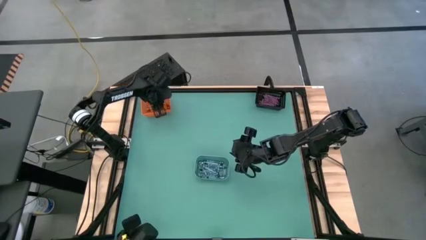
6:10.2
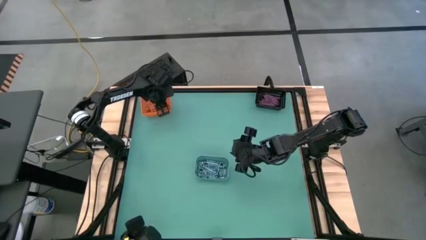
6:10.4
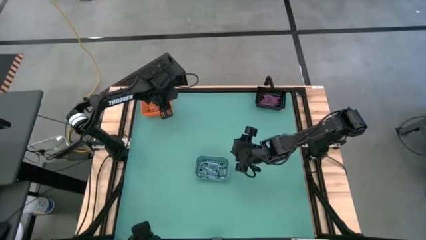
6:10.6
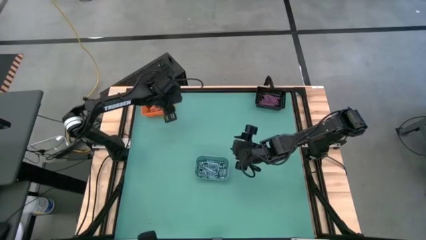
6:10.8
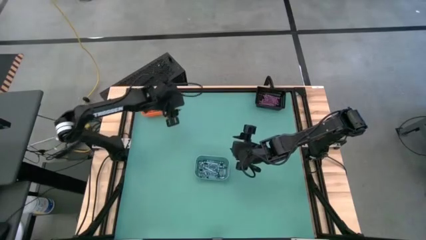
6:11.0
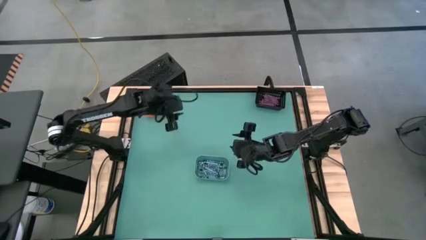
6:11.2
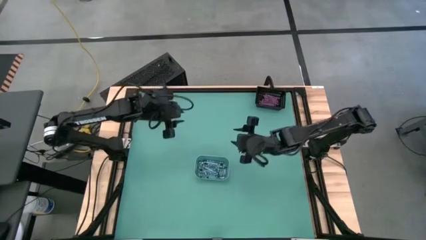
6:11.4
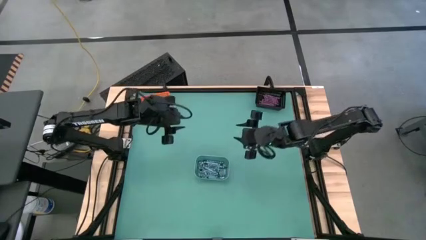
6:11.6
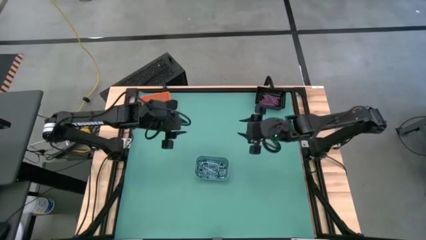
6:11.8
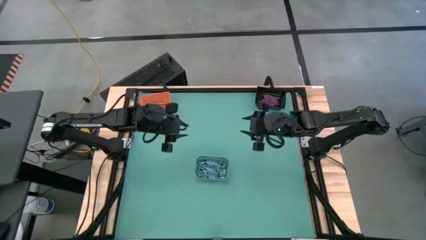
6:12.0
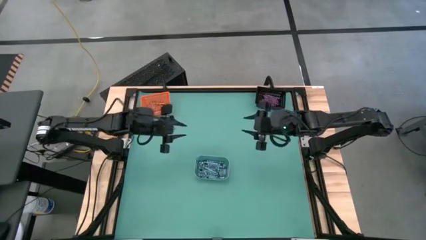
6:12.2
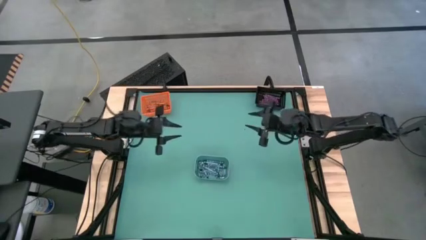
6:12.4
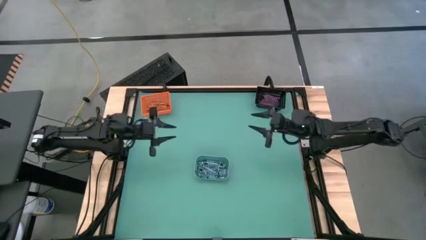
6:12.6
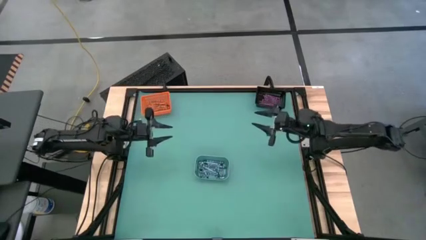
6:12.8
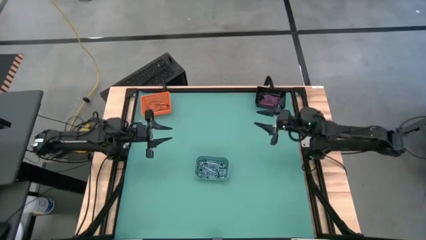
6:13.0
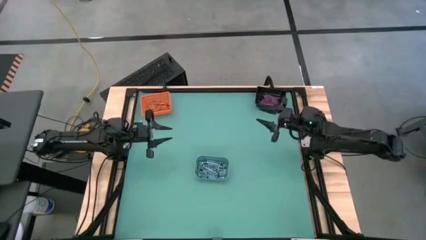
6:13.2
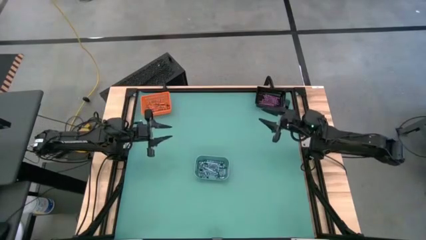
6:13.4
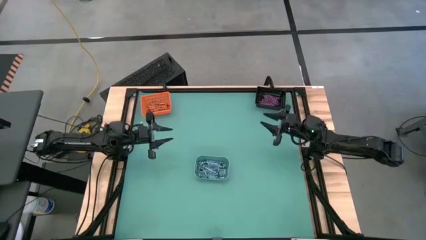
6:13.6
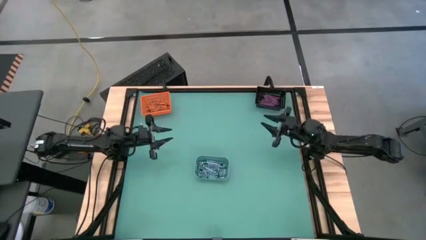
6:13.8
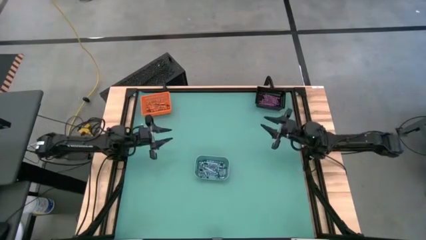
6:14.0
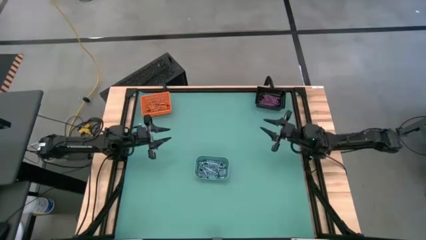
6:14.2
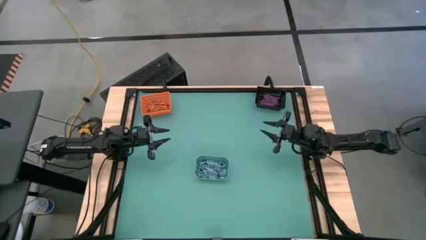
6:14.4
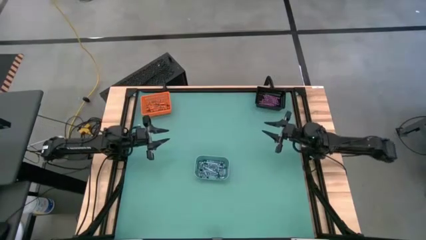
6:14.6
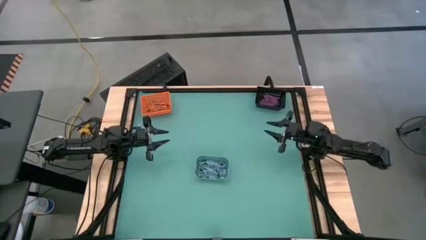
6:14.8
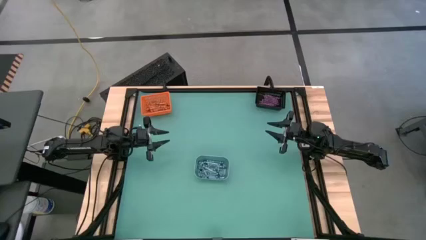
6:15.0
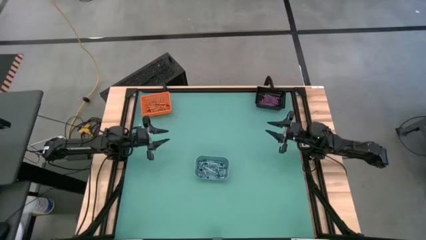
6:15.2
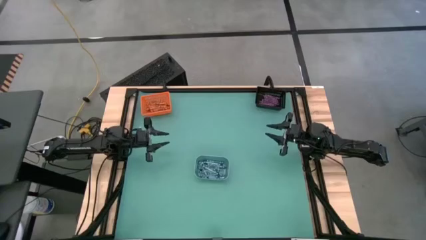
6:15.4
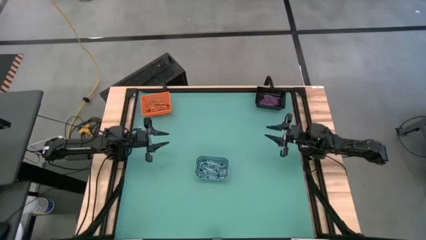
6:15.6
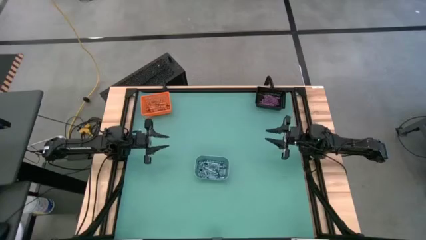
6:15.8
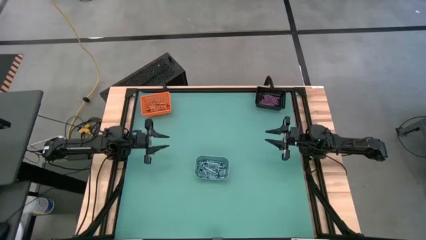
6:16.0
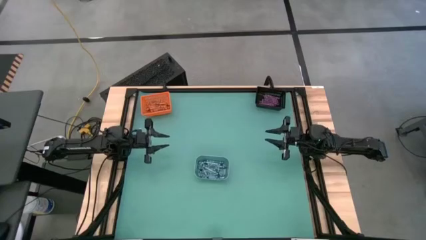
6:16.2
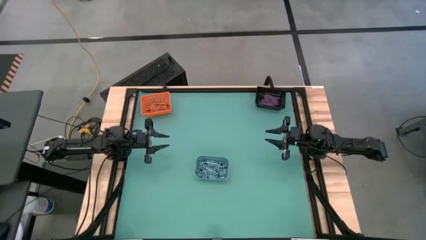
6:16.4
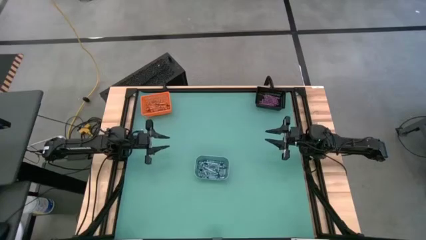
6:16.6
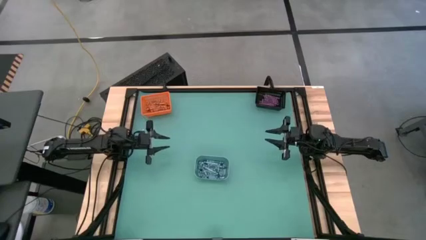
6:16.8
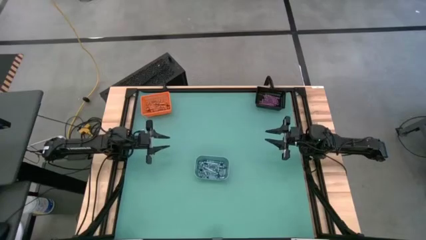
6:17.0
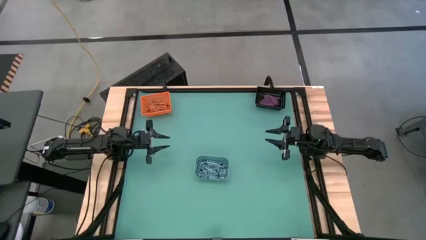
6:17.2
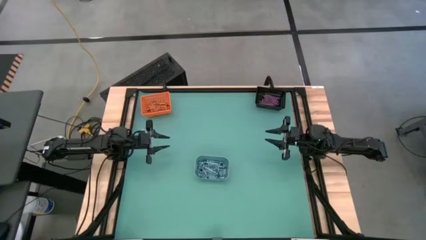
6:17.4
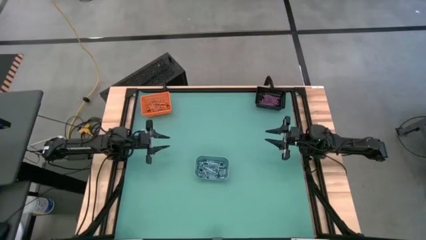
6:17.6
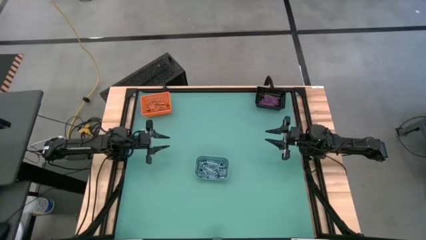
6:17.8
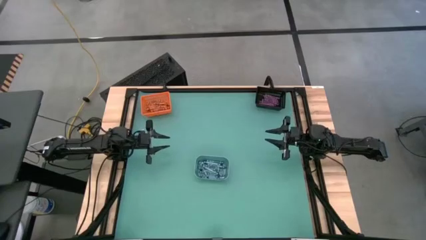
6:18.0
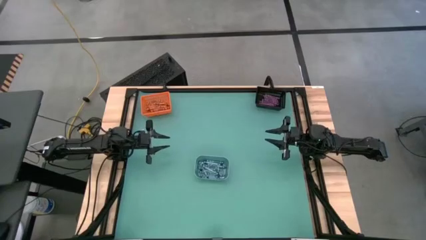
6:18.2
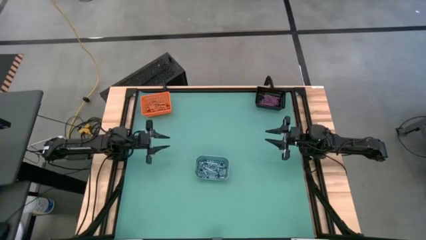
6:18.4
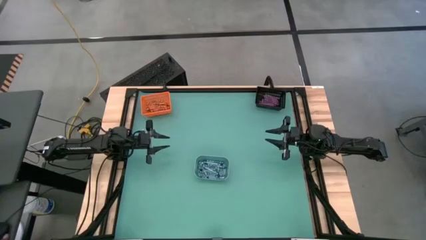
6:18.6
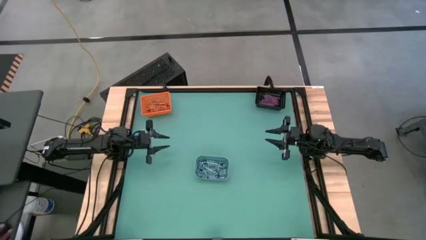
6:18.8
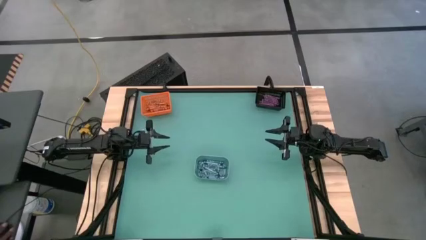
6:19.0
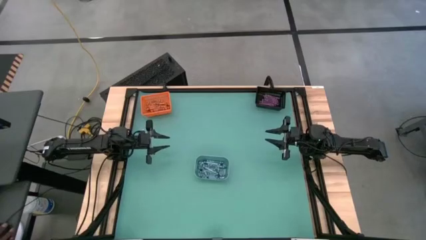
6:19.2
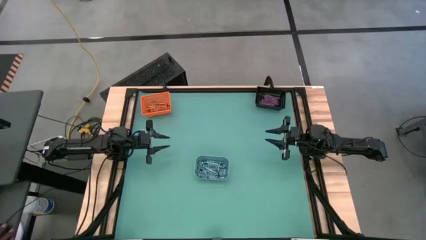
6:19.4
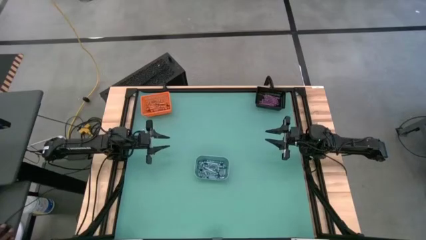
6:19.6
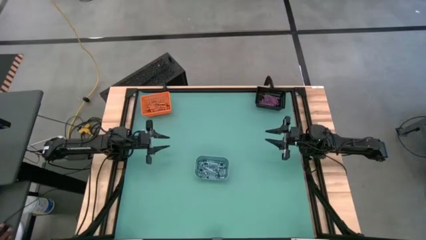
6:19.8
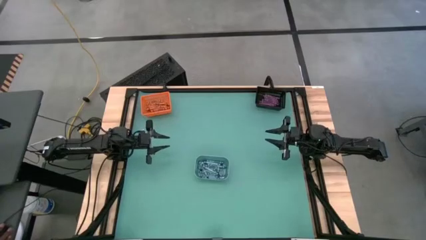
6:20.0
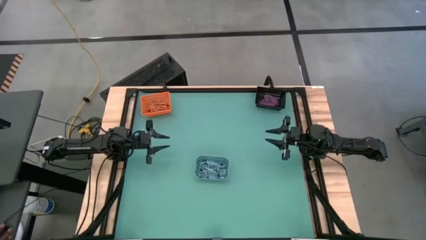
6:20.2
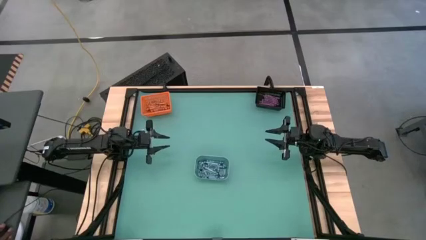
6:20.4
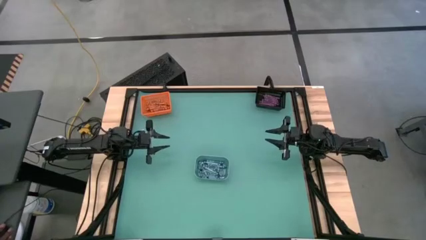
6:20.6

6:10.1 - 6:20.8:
Task: Sort crayons
Return to Home Position

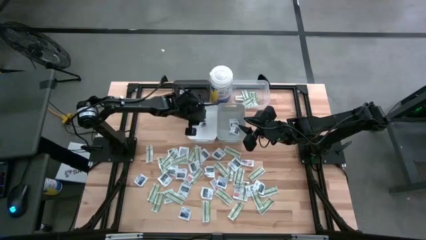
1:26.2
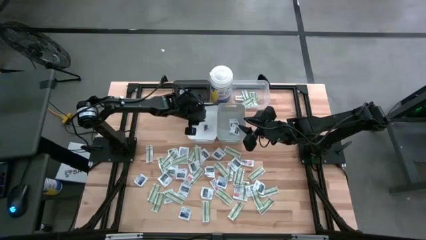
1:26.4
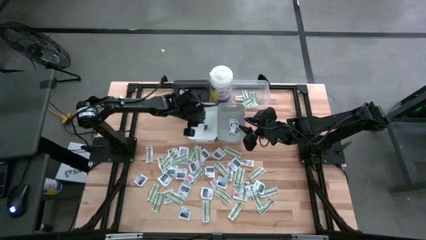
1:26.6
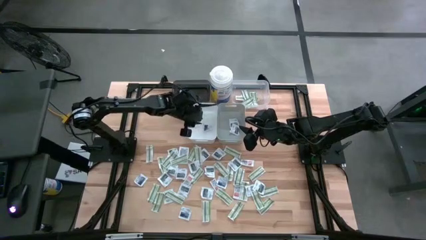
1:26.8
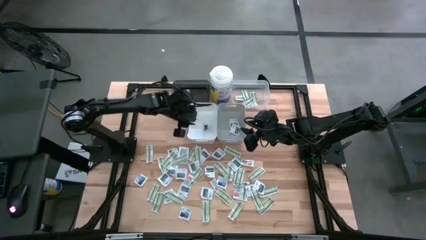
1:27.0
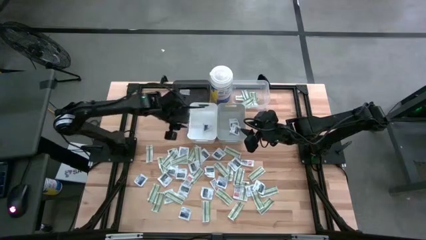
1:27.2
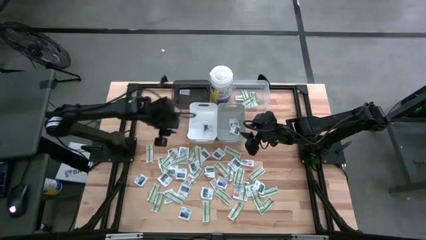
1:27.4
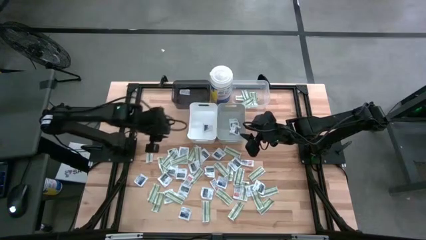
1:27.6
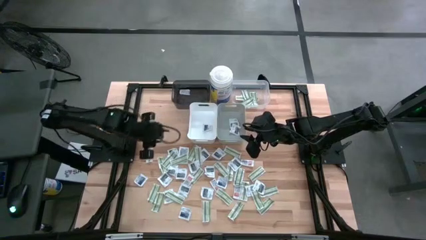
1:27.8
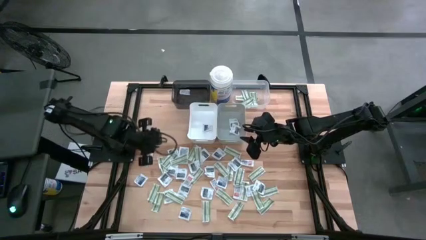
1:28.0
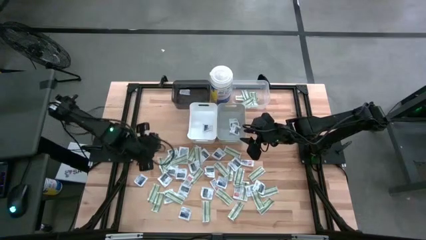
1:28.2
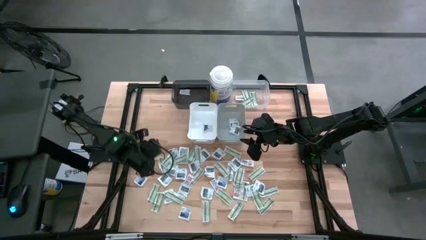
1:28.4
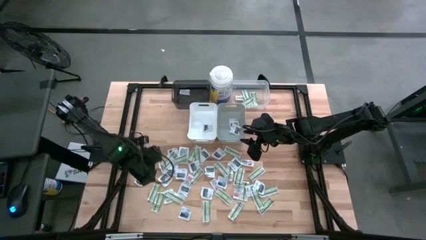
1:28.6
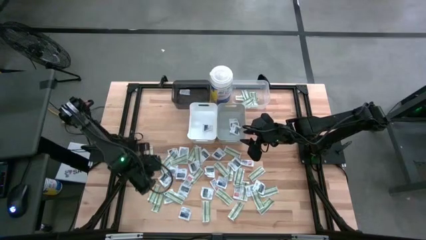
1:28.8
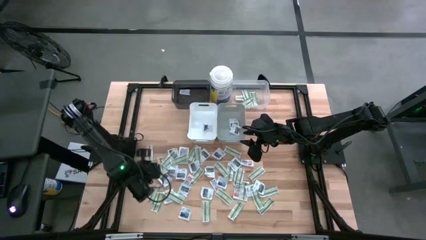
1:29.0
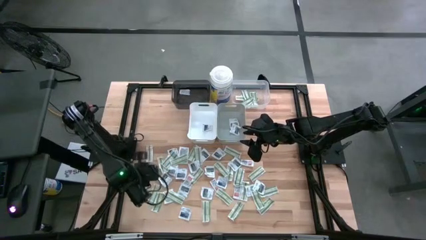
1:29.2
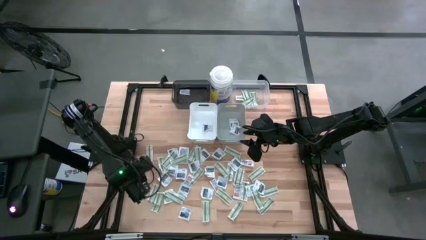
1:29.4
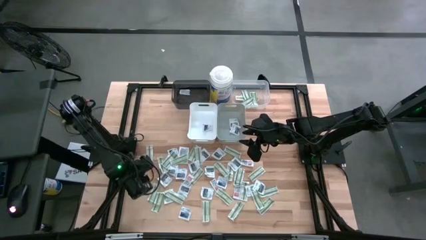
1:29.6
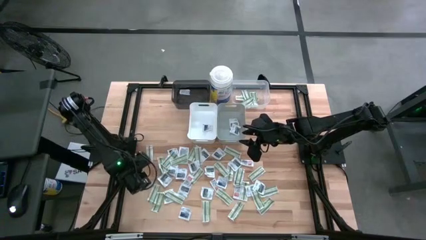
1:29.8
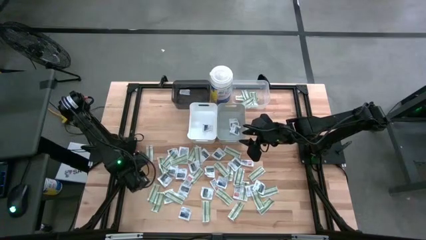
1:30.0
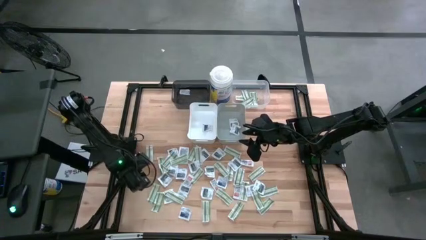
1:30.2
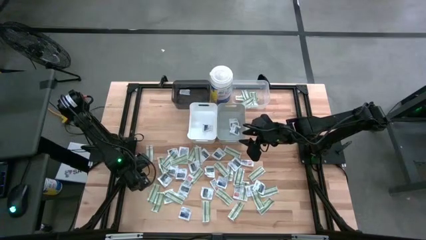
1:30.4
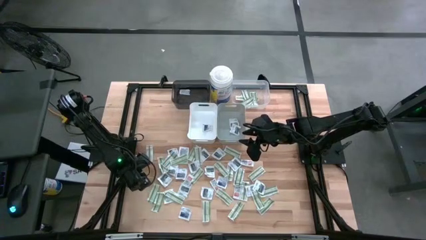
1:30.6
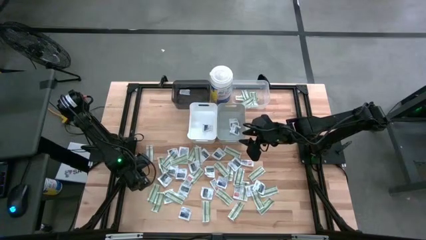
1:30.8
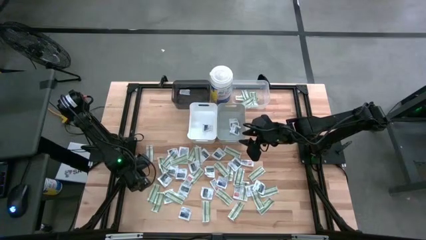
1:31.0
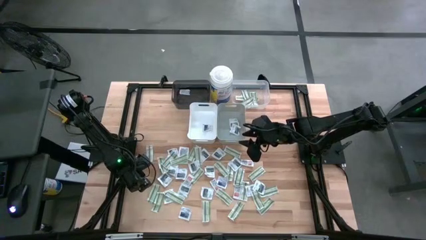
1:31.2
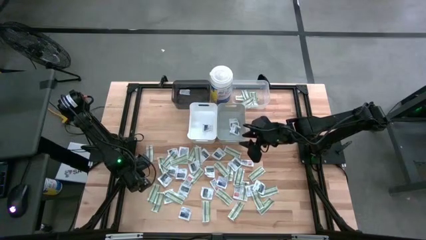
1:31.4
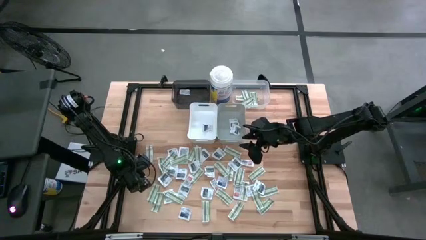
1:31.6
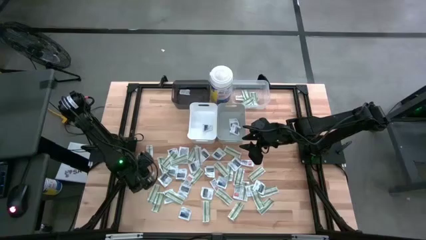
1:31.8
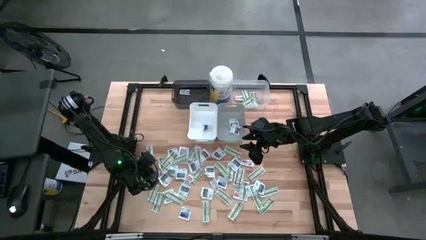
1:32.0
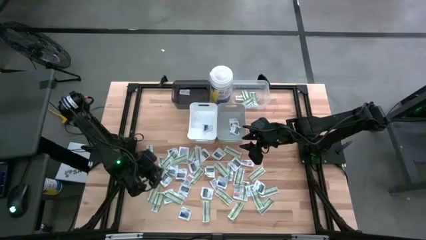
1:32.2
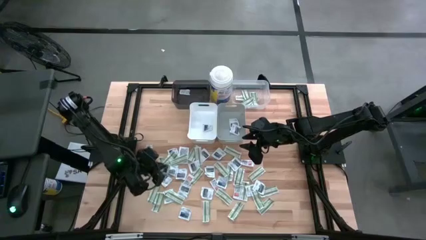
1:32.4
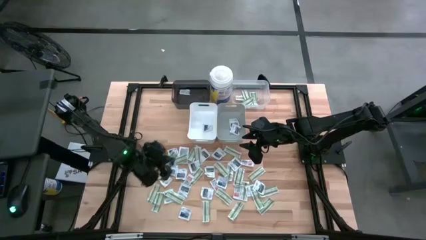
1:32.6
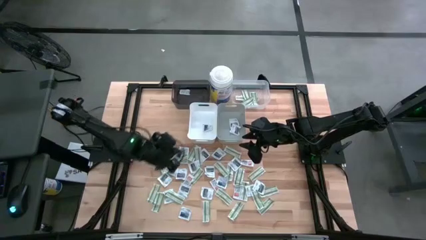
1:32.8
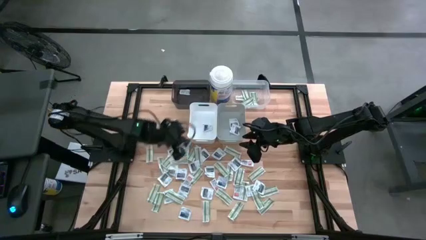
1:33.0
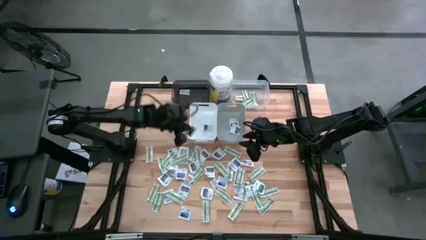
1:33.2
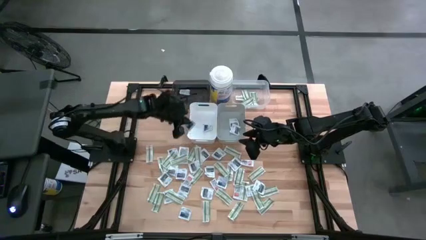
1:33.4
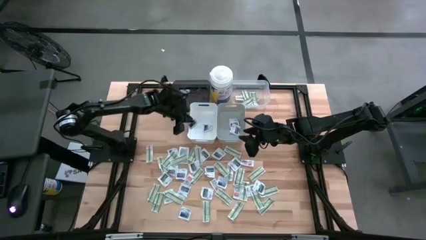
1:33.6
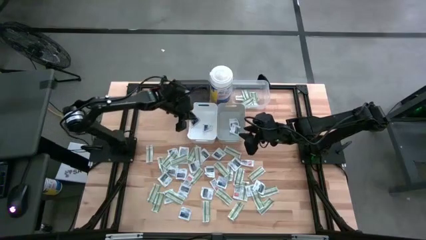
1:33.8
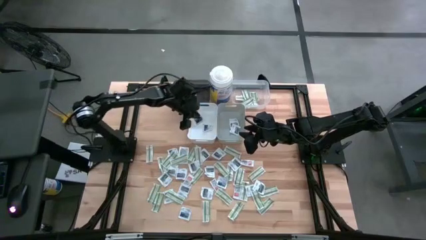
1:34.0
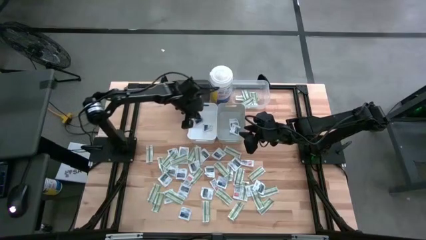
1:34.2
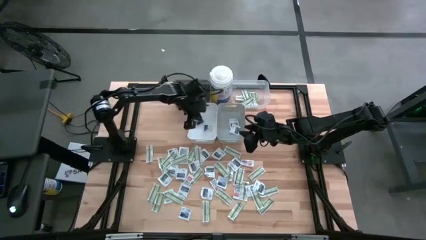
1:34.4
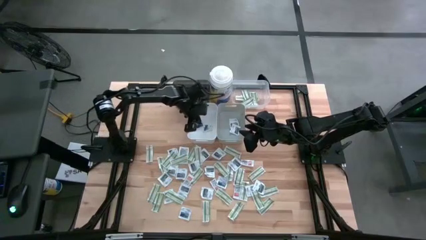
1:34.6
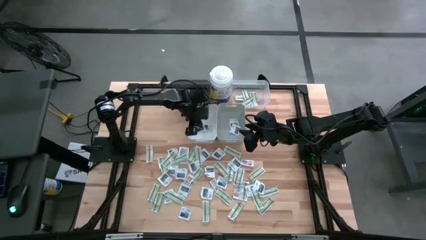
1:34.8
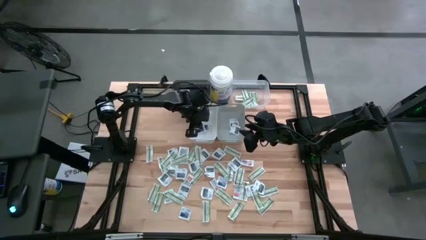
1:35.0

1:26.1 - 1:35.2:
Task: Pick & Place First Aid Supplies
Put the alcohol wipe into the white bin
